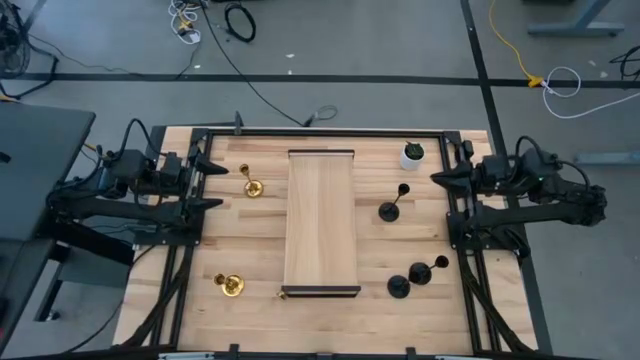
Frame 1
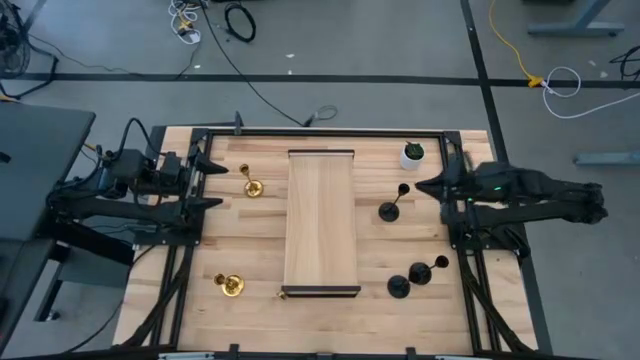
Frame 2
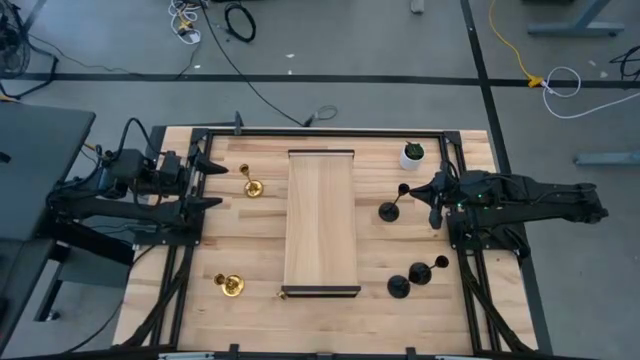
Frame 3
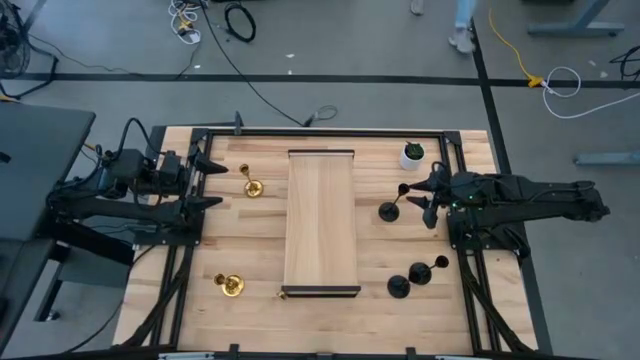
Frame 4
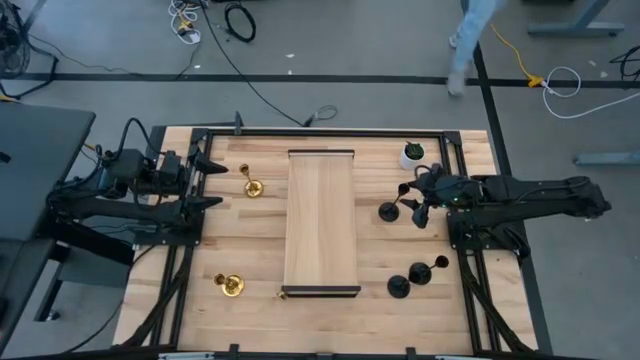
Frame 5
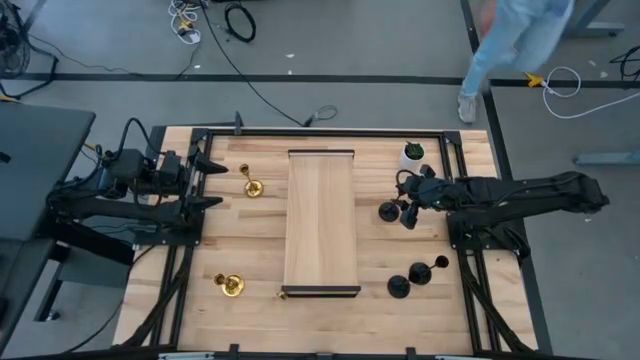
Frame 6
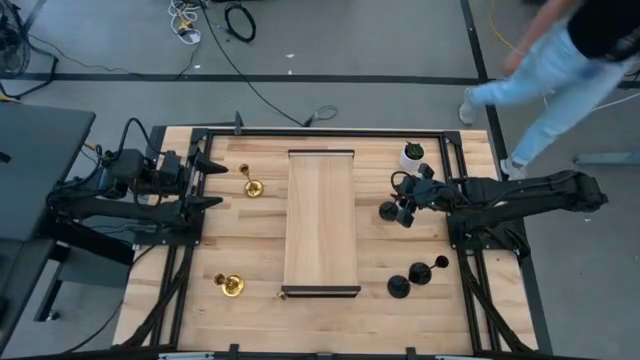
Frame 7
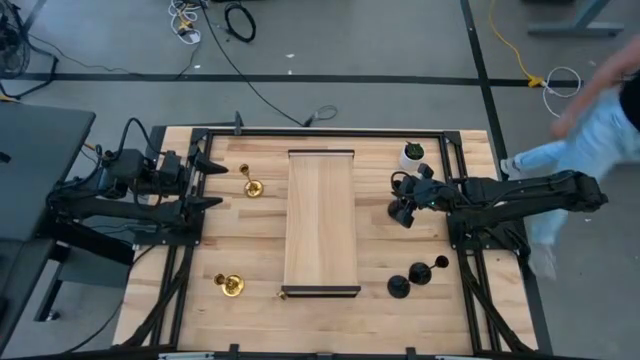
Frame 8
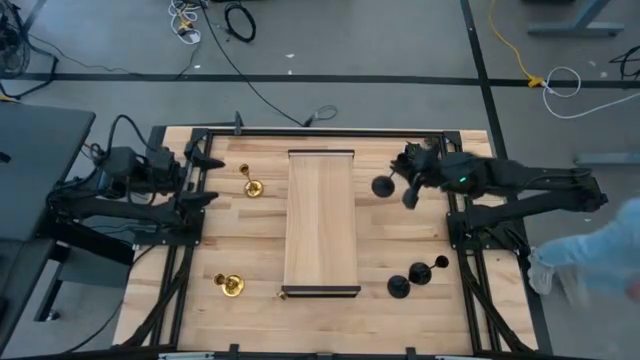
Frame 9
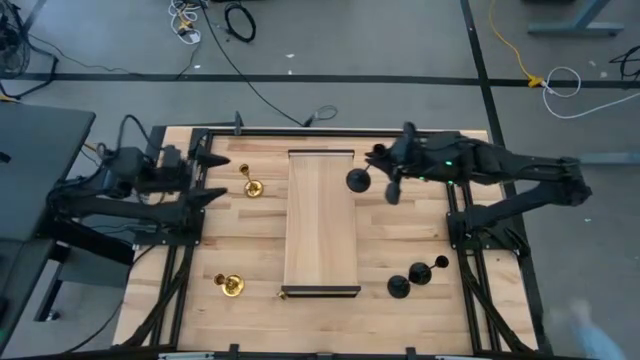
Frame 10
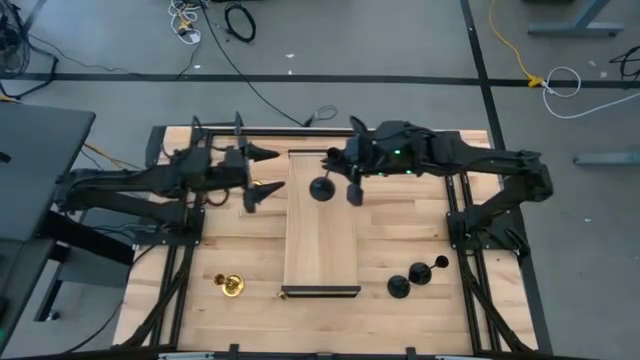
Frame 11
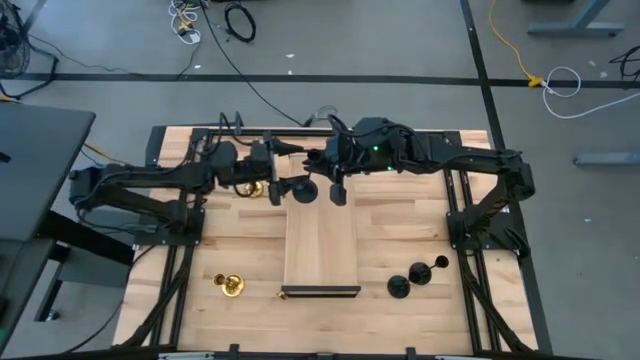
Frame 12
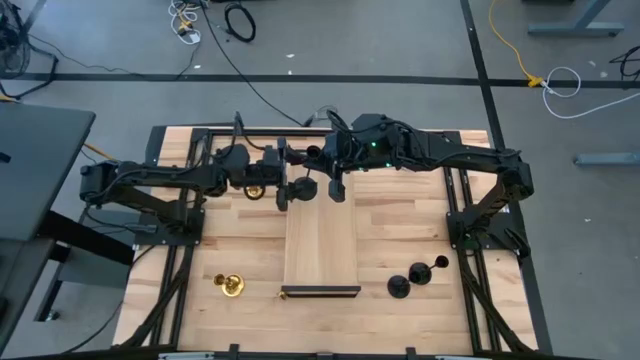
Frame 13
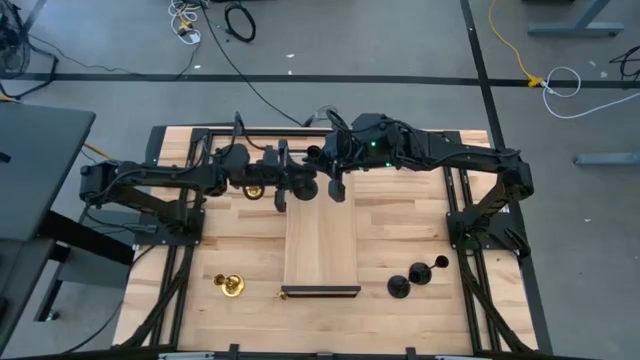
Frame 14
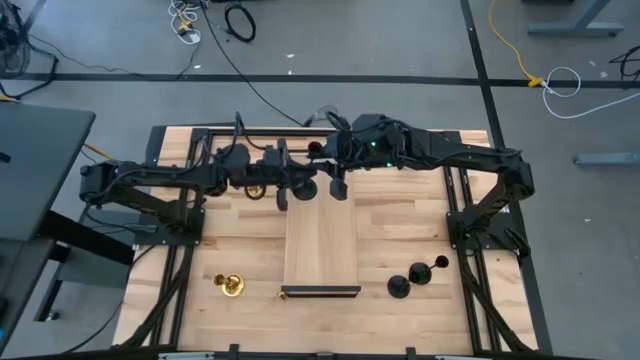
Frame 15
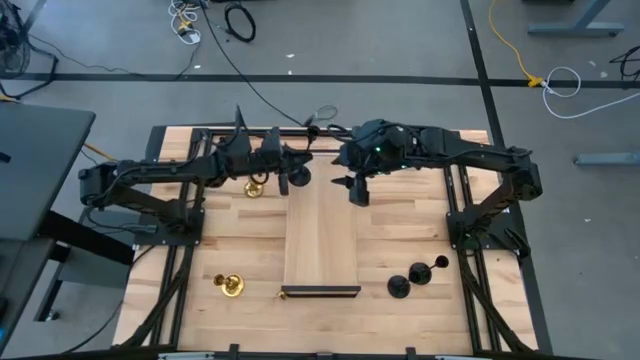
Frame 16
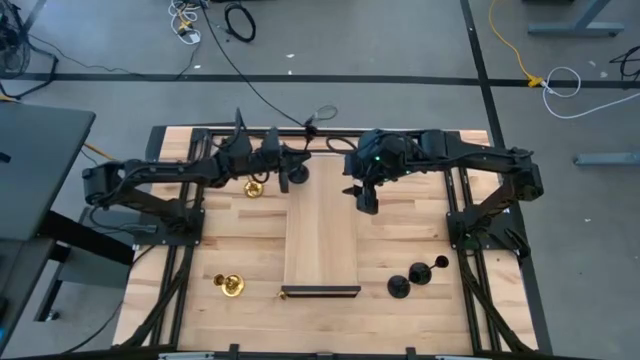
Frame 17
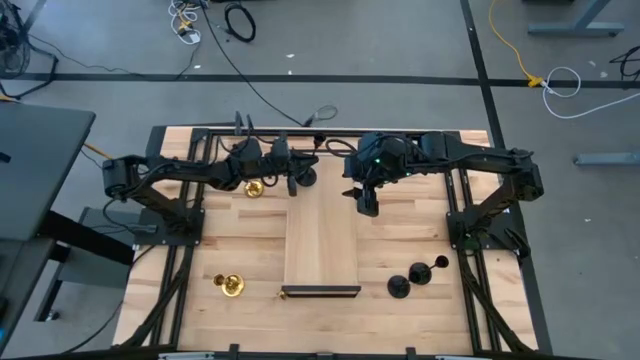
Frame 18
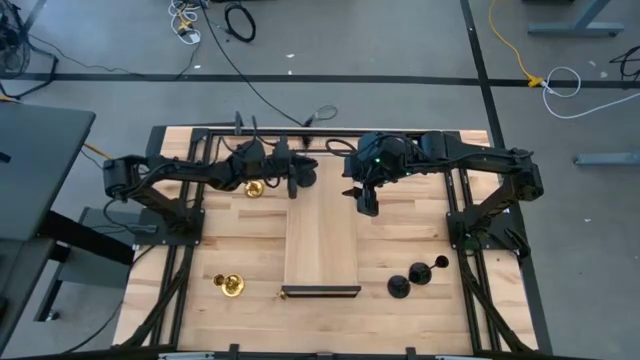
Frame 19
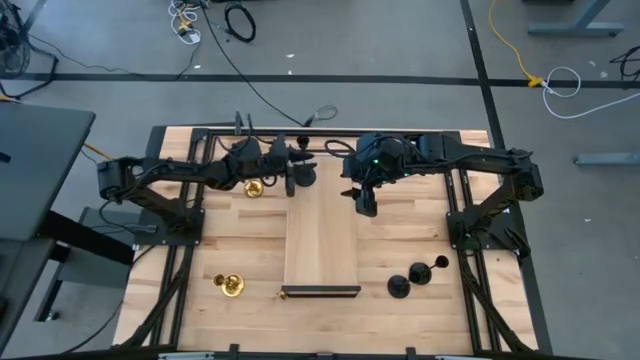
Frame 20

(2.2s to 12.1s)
Task: Pick & Place candle stick holders
Put the black candle holder on the shelf

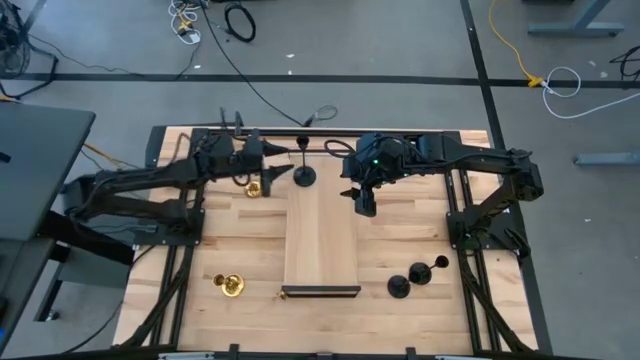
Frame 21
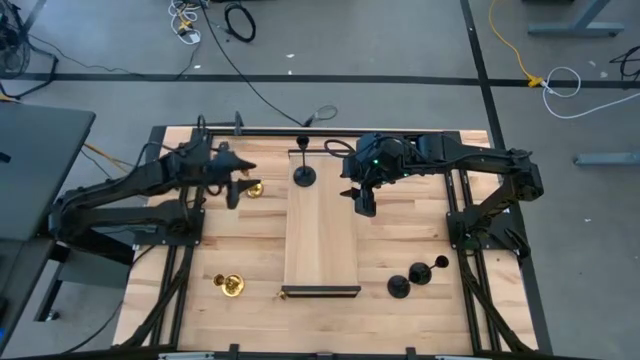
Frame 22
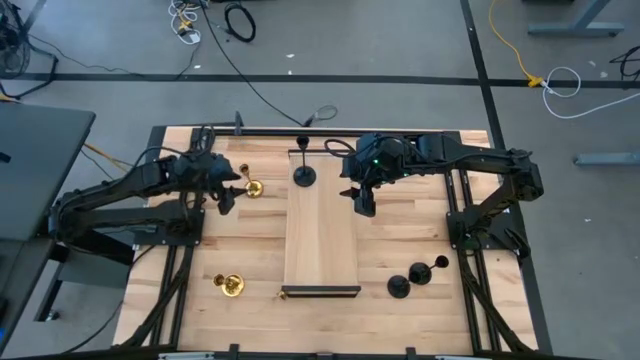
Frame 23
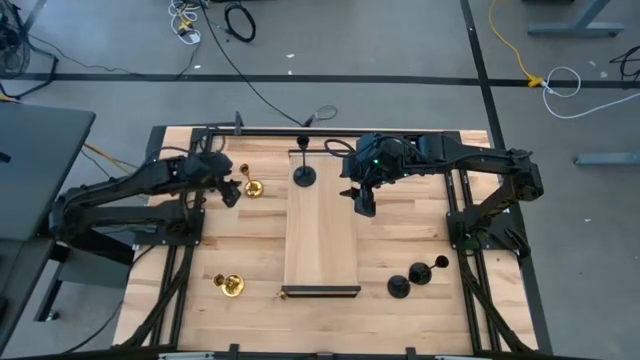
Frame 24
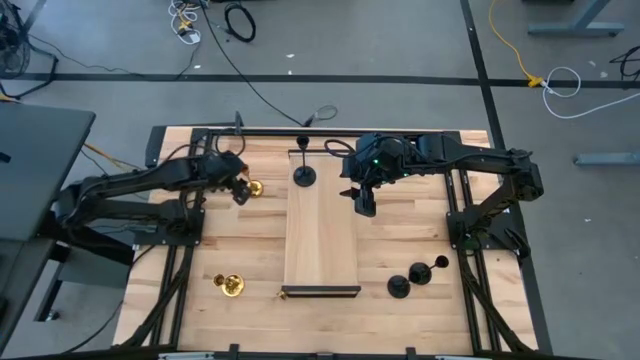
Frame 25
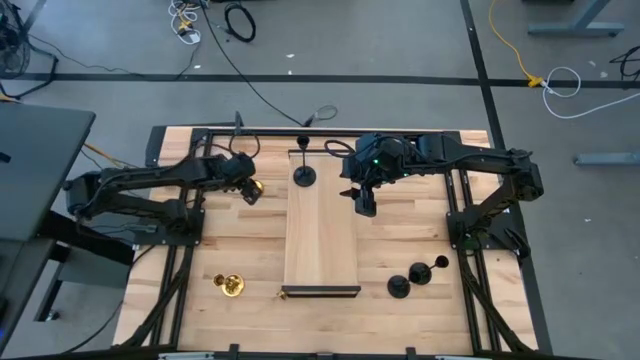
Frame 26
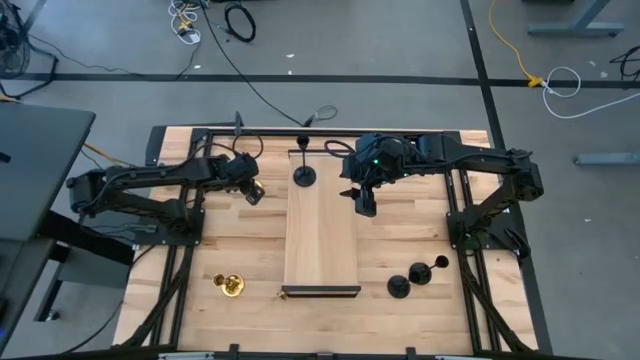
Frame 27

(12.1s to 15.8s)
Put the golden candle holder on the shelf aligned with the black candle holder

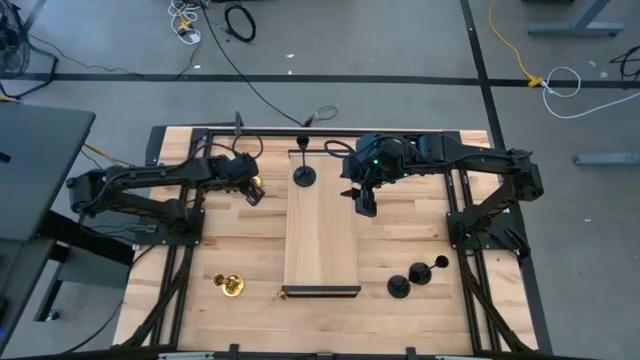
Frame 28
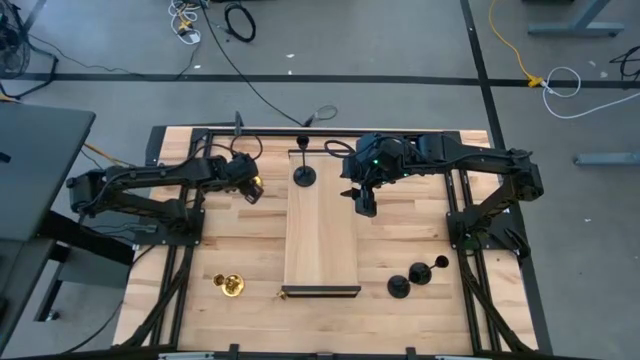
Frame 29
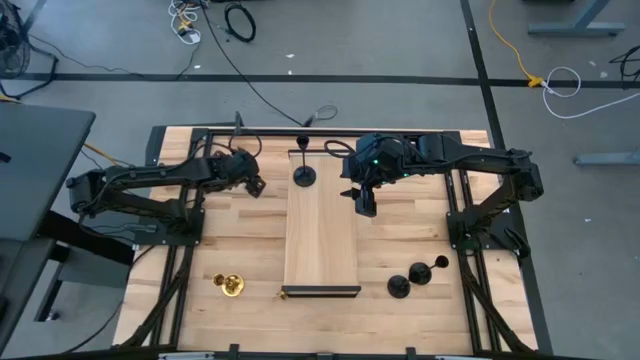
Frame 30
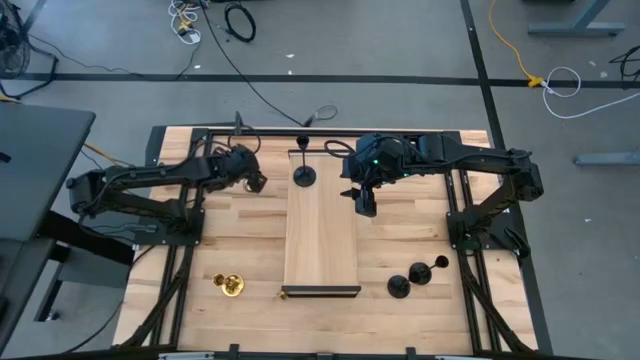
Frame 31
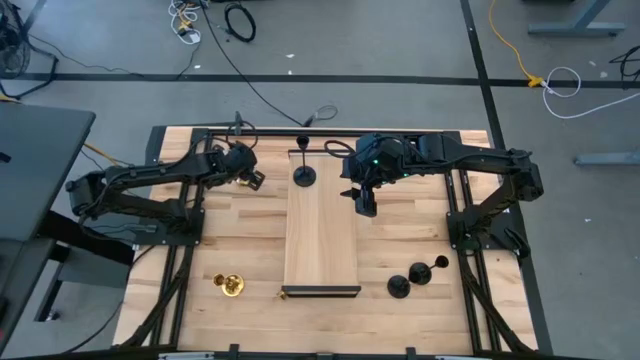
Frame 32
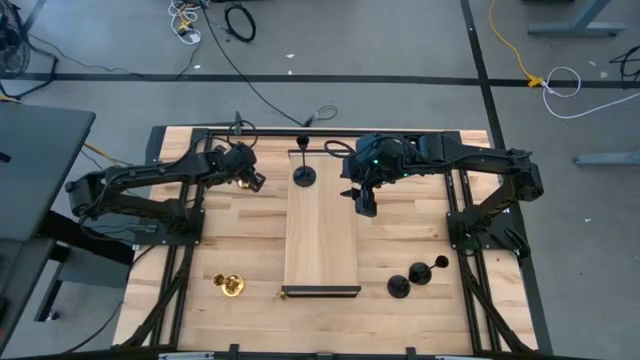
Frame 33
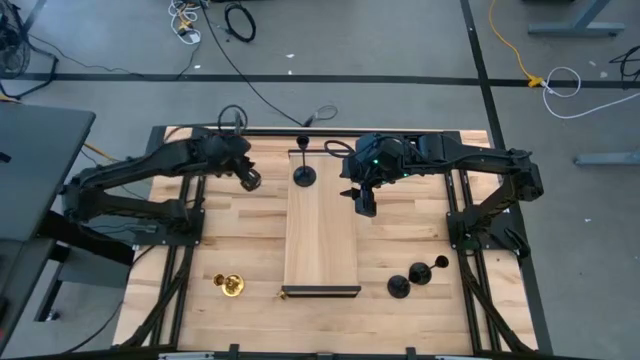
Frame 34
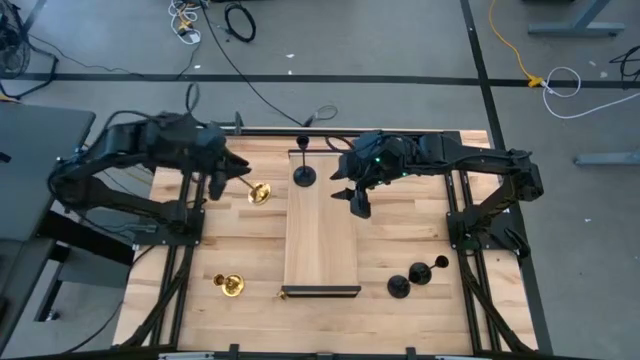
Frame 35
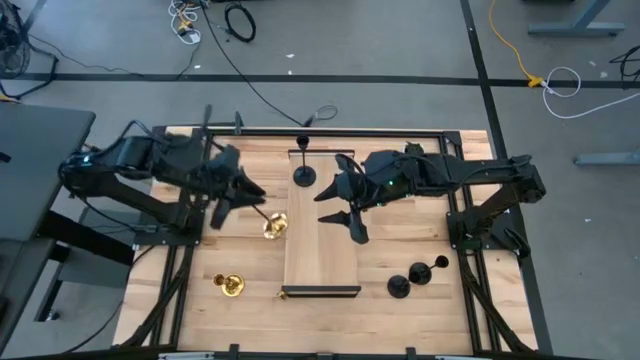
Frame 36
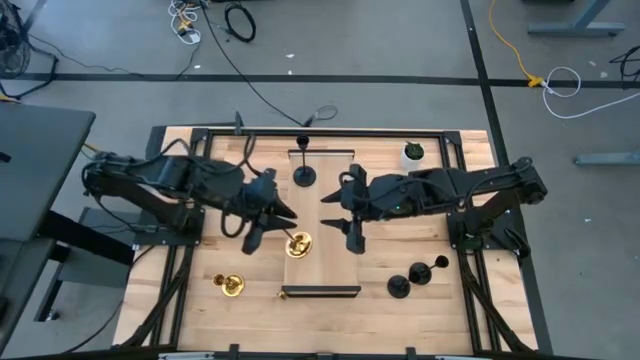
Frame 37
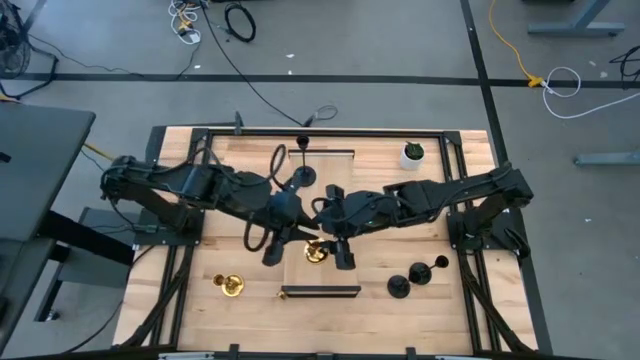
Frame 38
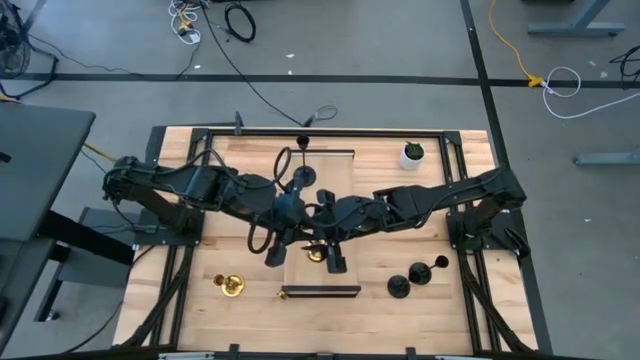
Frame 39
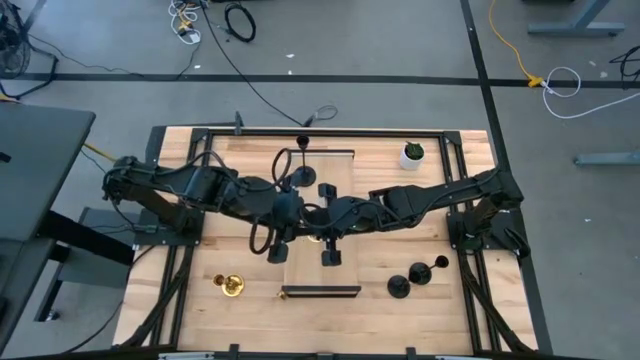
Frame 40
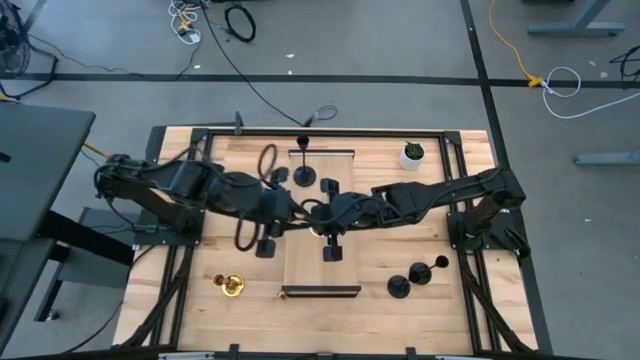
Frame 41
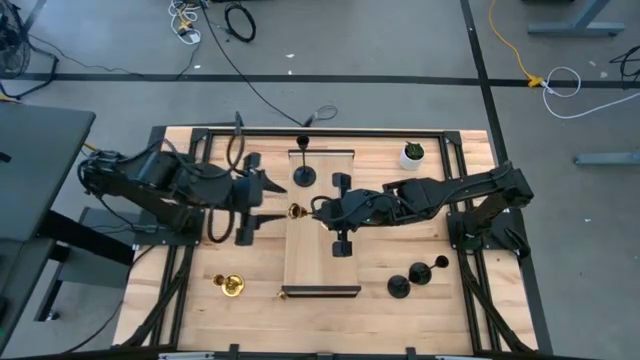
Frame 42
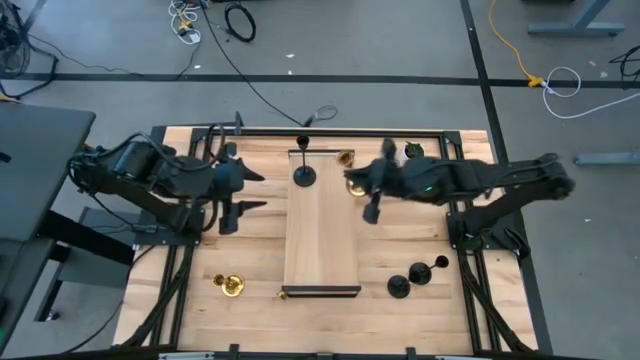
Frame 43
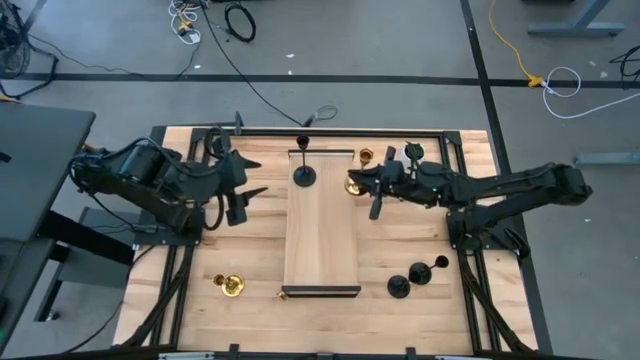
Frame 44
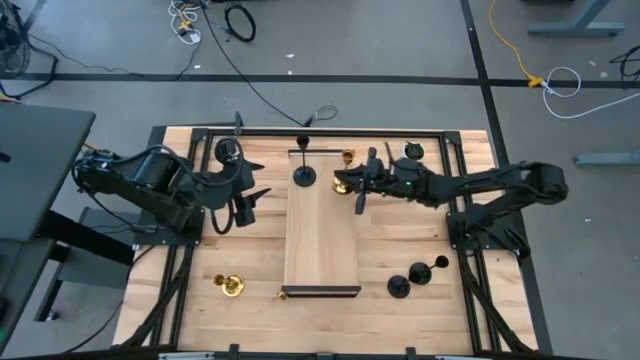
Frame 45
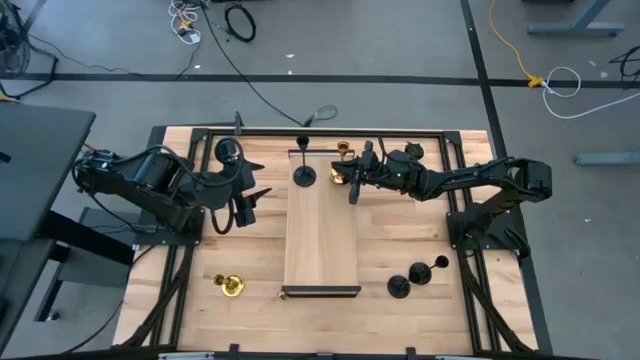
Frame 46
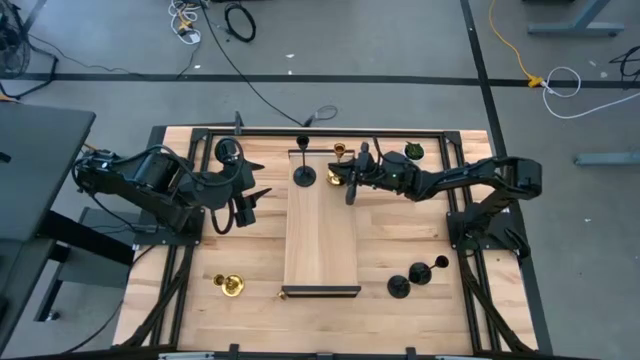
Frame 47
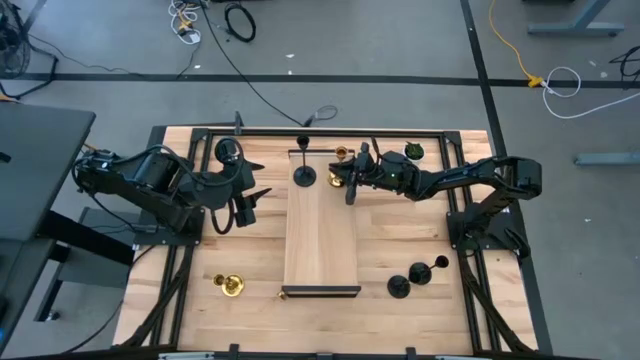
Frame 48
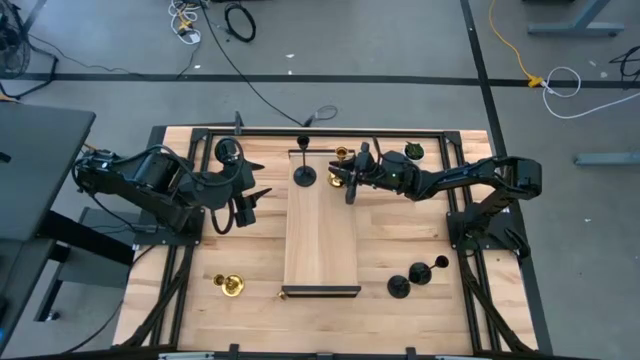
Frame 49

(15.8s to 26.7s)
Put the golden candle holder on the shelf aligned with the black candle holder
